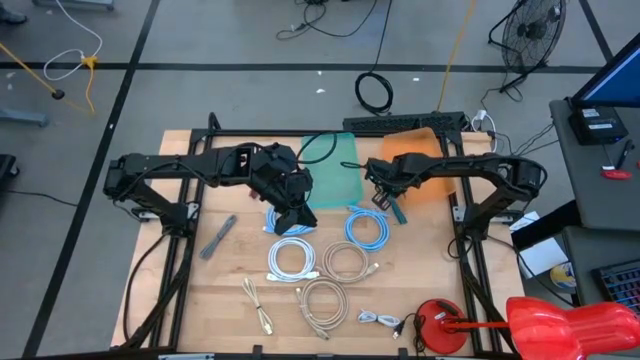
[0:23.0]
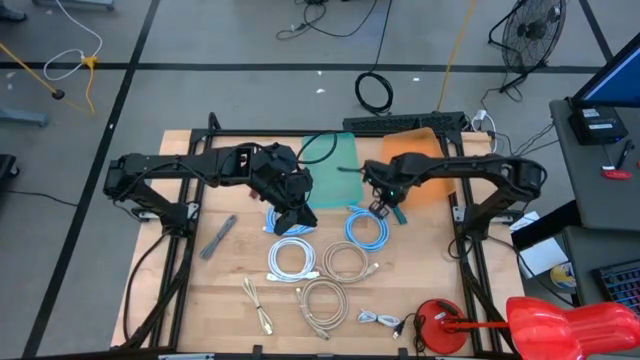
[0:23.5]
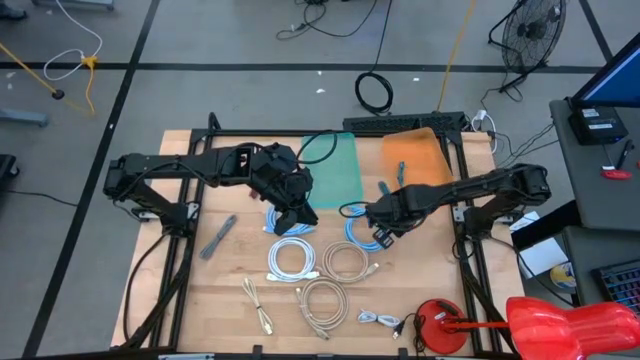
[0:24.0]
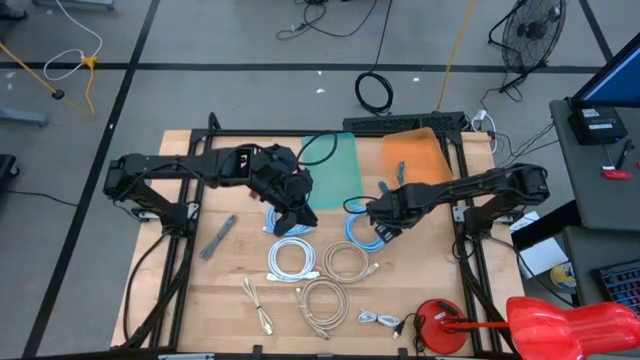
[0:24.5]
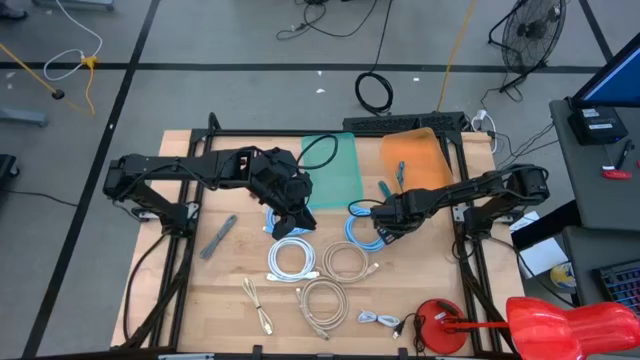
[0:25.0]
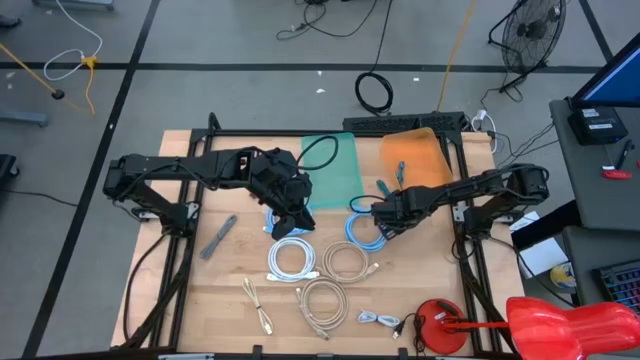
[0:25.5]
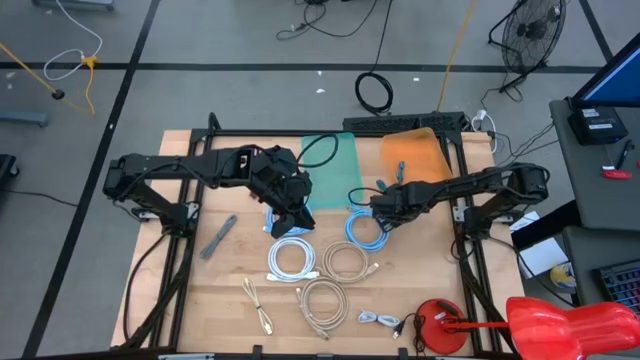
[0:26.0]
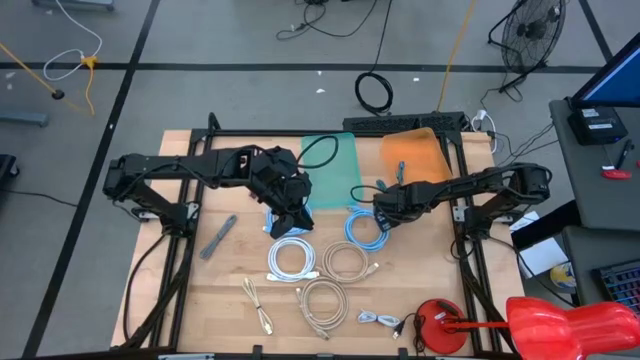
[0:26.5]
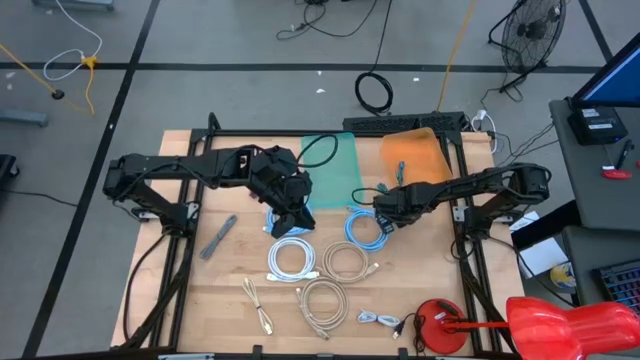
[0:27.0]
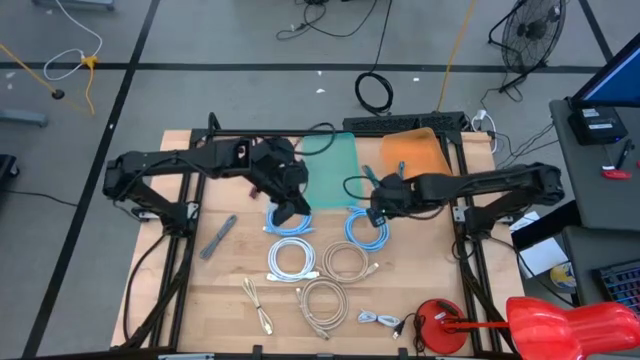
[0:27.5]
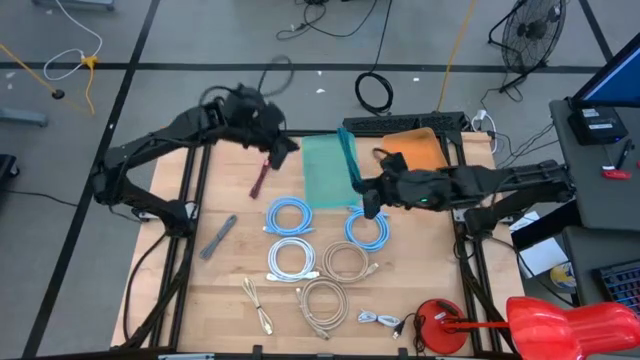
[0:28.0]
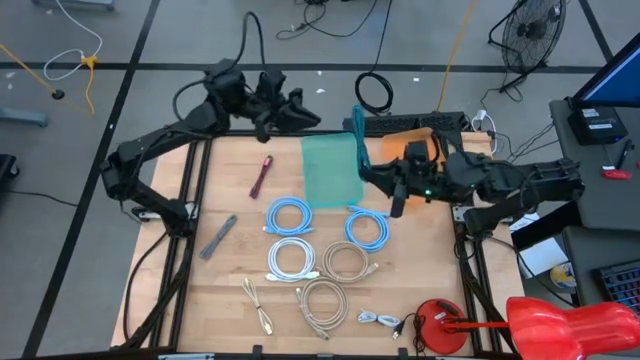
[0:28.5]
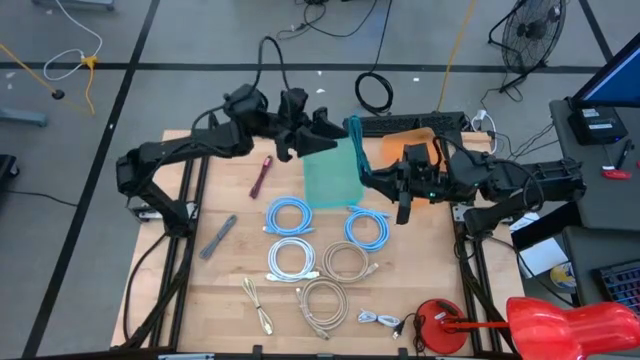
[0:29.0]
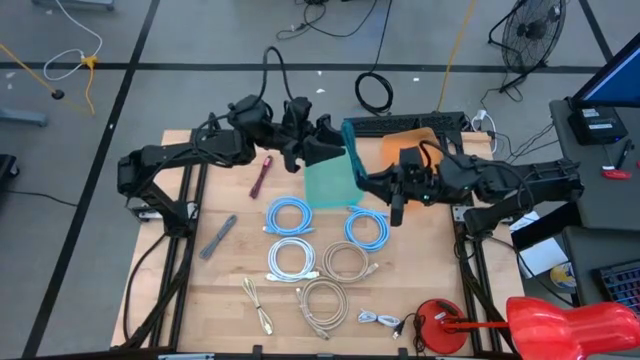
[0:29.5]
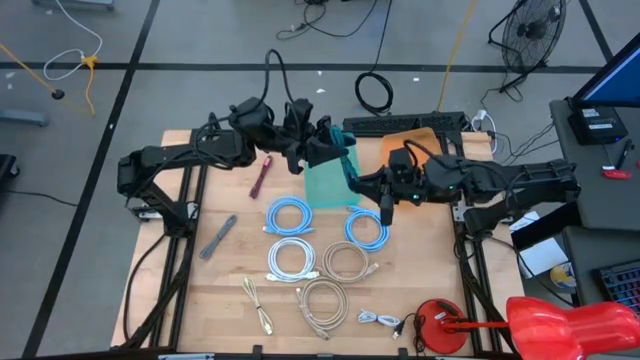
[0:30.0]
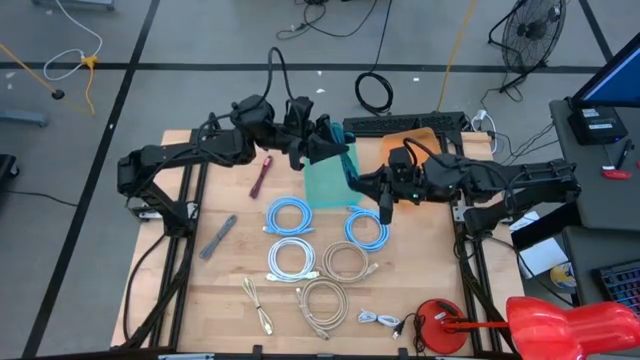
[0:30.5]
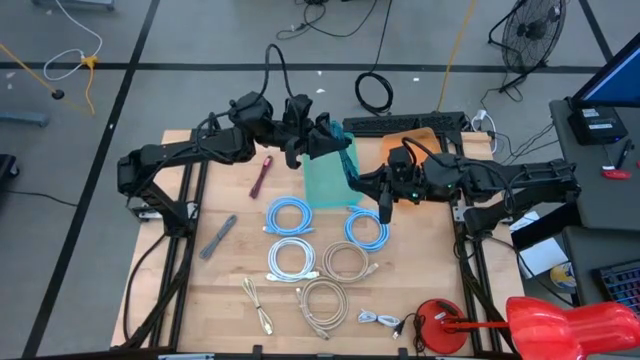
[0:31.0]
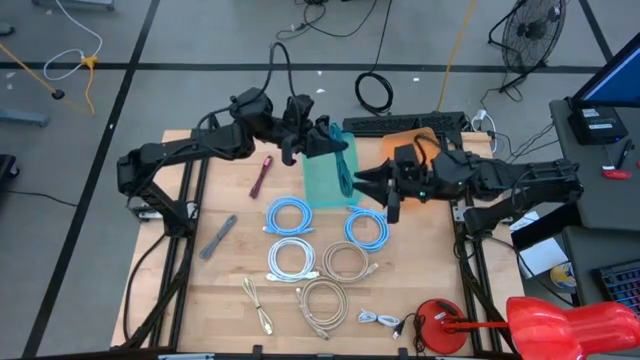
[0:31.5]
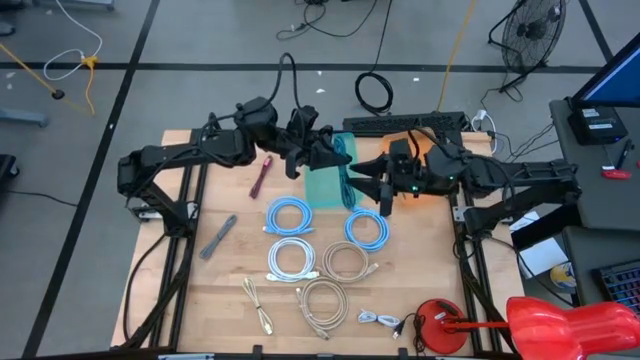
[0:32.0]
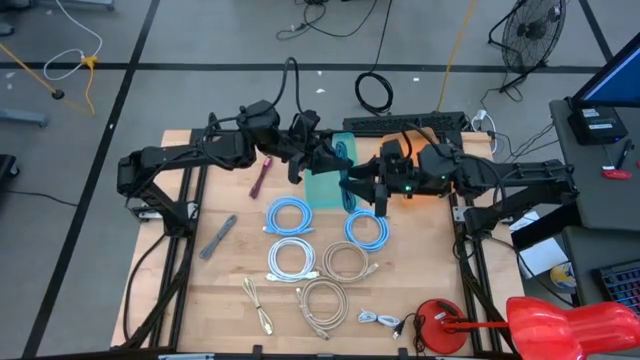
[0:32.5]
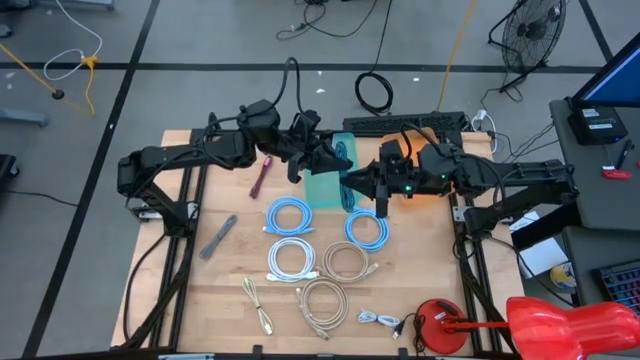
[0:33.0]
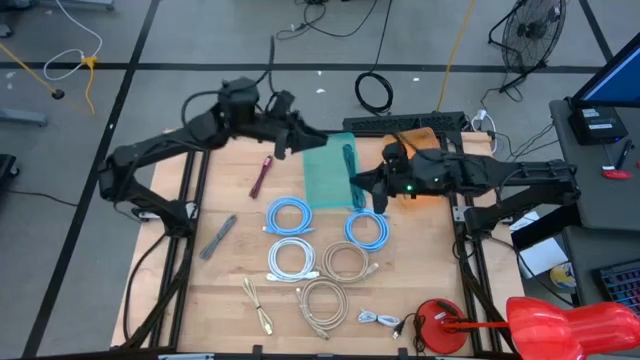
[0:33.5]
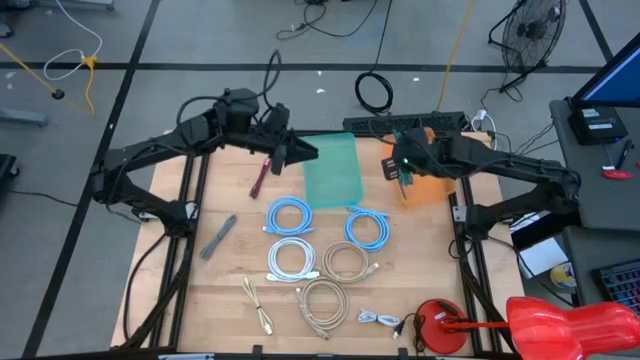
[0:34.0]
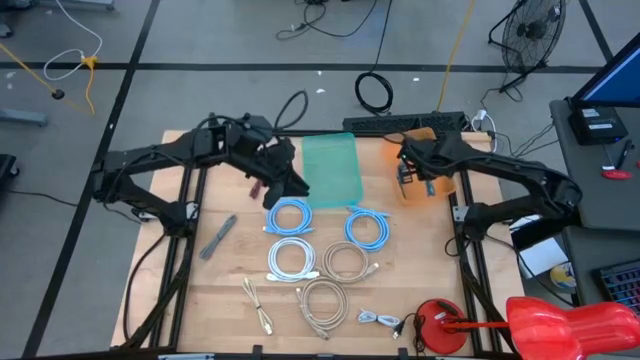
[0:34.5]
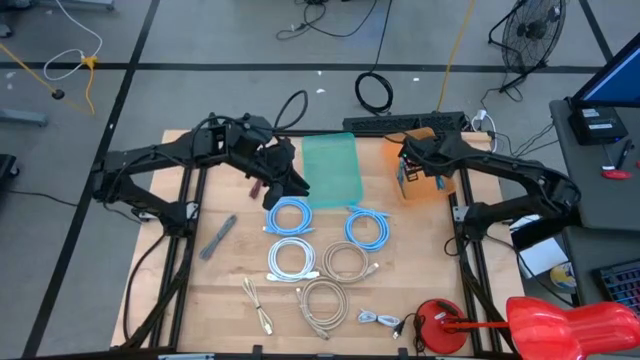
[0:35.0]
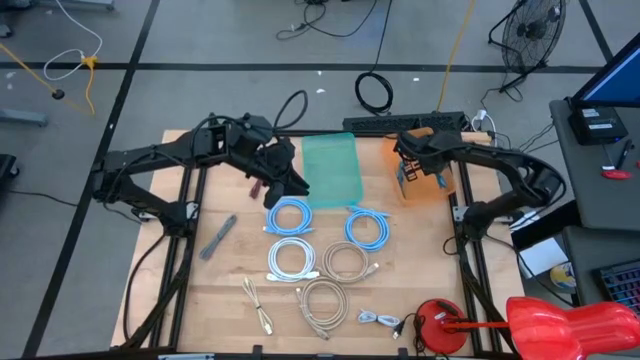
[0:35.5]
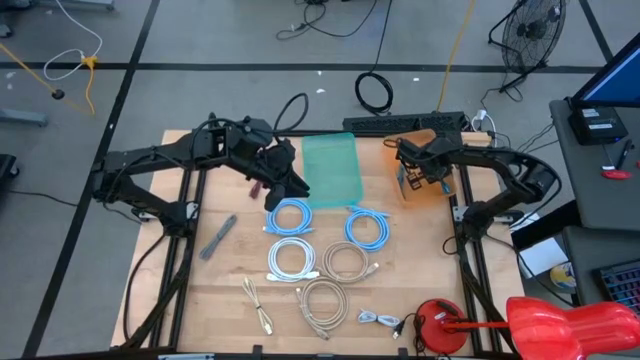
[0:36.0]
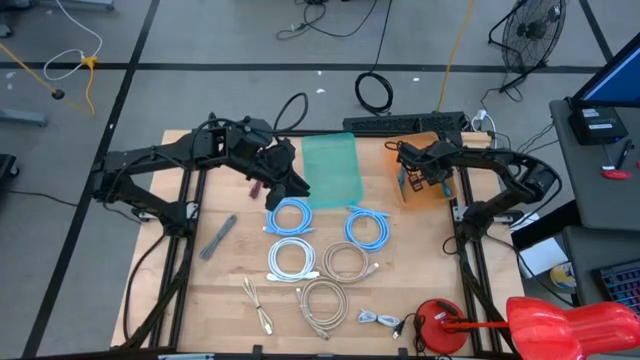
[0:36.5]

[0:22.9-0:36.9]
Task: Pick & Place USB Port
Put the blue changer cable into the orange bin

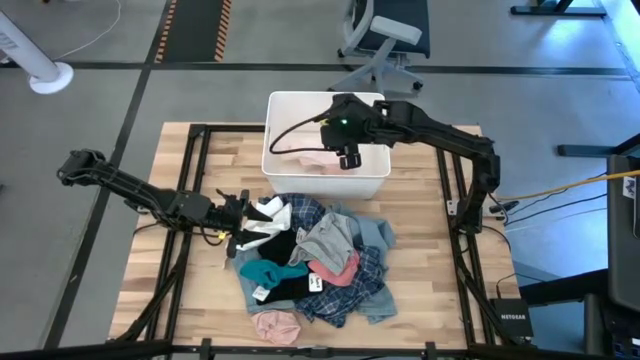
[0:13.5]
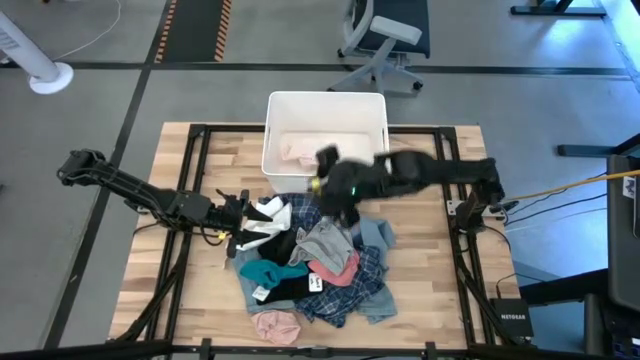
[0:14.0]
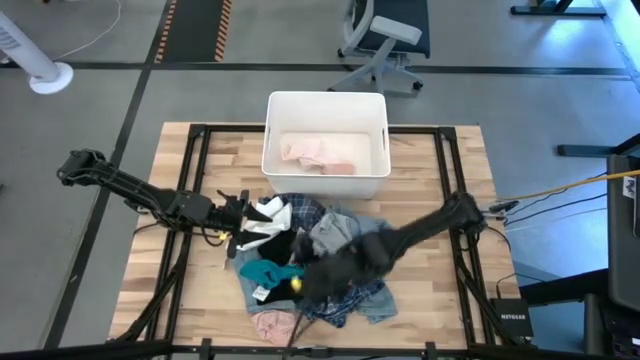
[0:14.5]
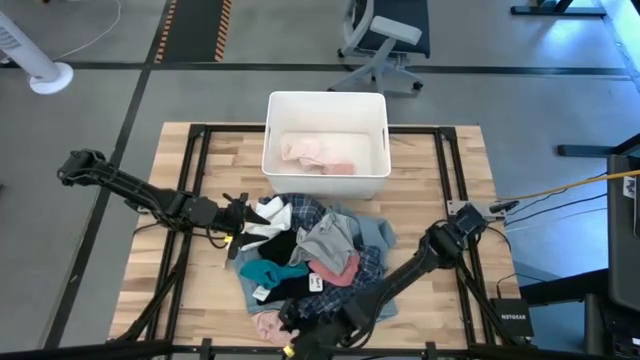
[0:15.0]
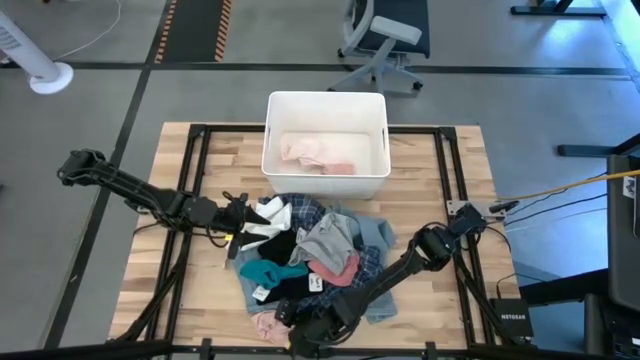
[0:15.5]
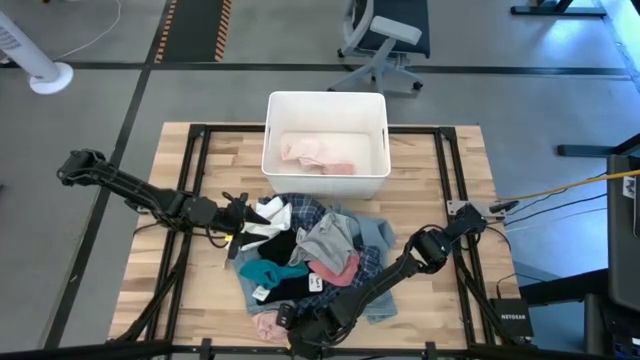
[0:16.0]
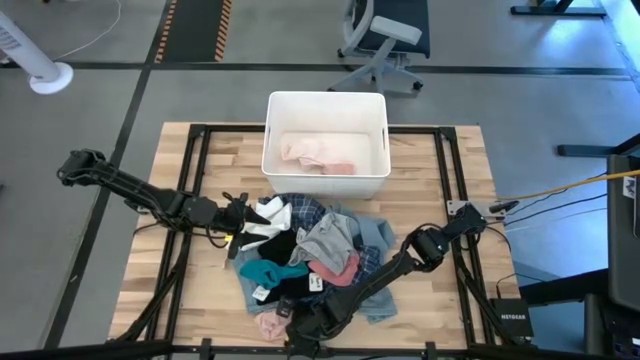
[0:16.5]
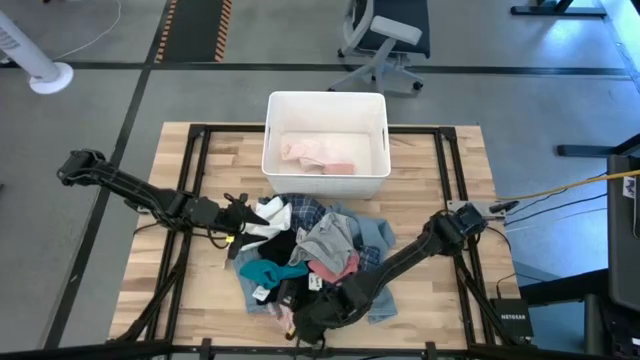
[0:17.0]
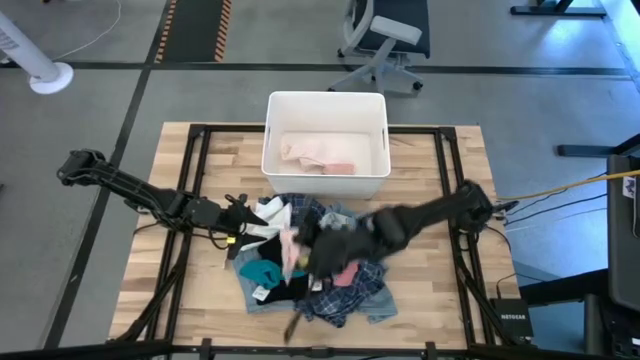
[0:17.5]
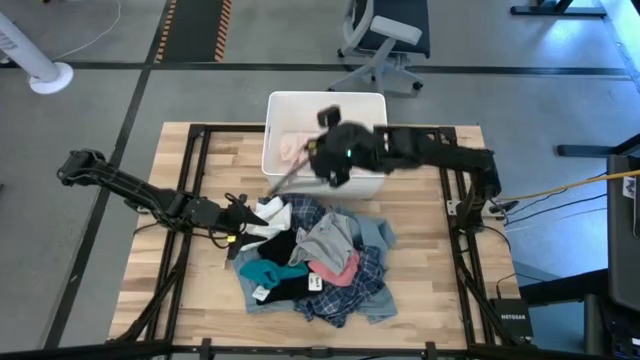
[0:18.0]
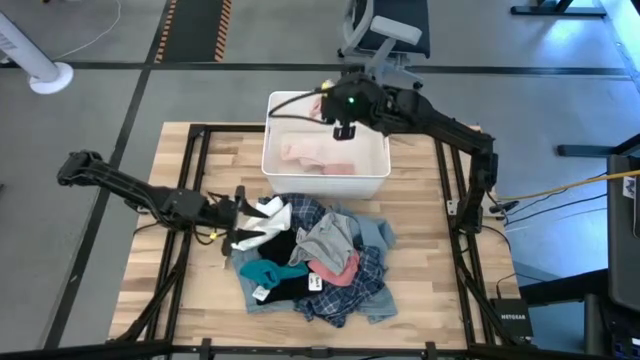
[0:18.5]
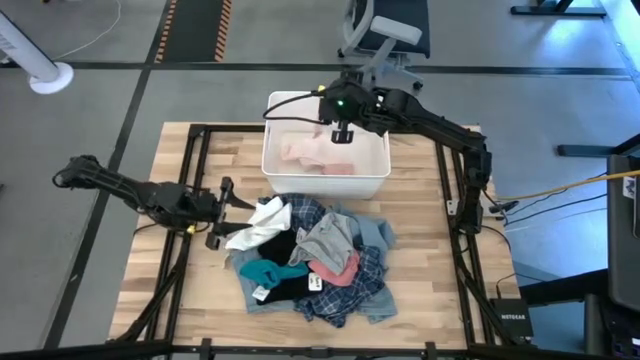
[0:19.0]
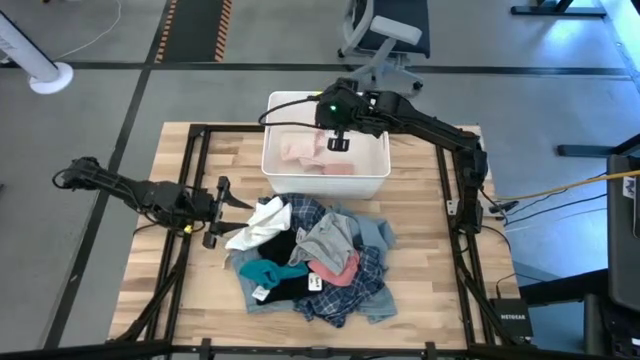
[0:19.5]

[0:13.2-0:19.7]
Task: Sort clothes
Put the pink sock into the white laundry bin
